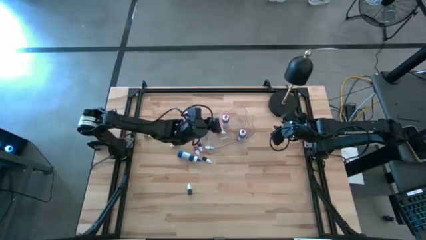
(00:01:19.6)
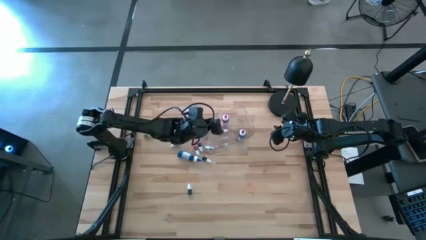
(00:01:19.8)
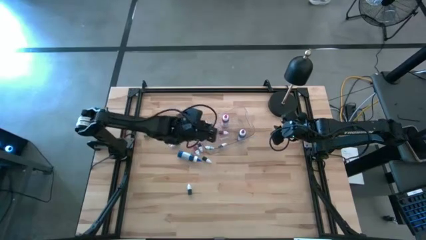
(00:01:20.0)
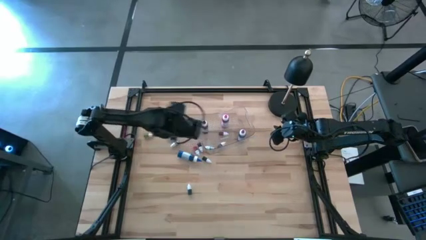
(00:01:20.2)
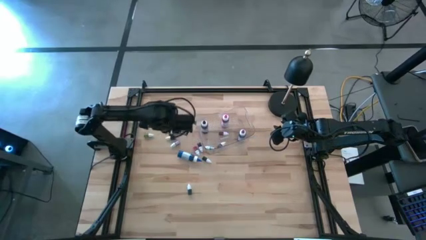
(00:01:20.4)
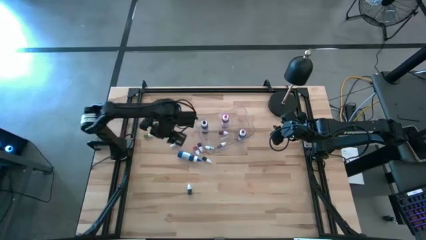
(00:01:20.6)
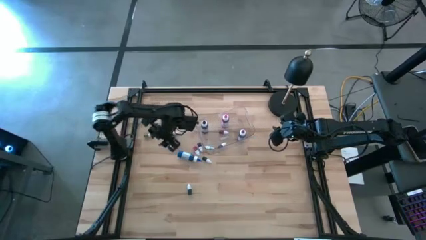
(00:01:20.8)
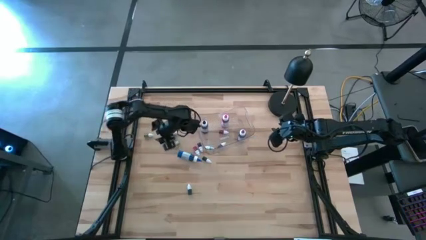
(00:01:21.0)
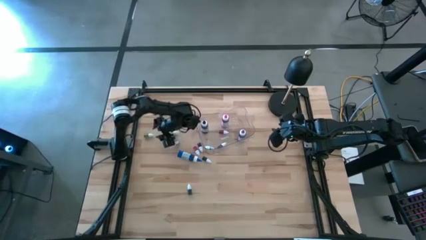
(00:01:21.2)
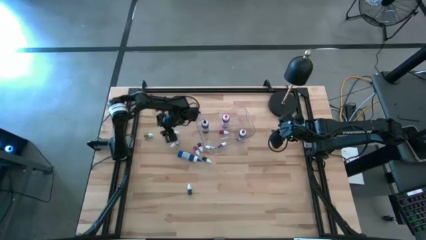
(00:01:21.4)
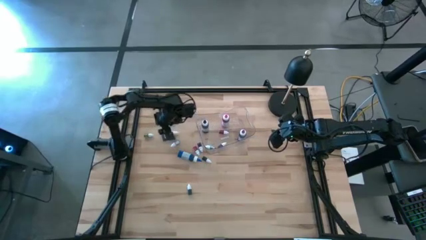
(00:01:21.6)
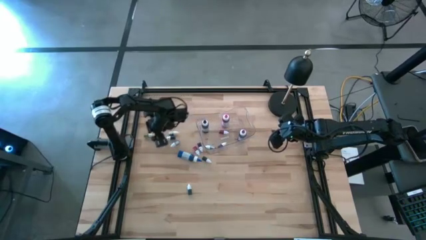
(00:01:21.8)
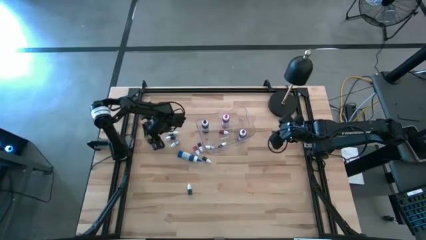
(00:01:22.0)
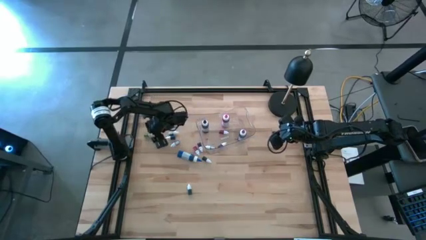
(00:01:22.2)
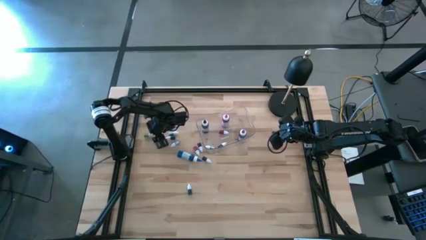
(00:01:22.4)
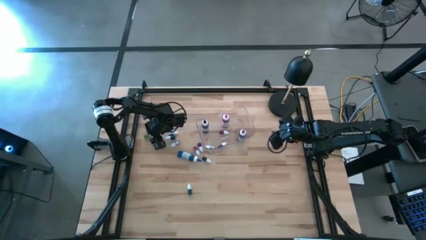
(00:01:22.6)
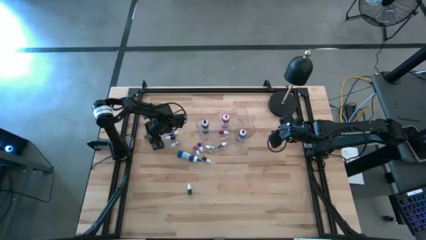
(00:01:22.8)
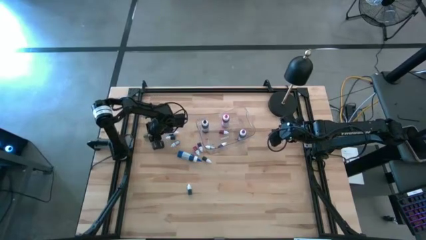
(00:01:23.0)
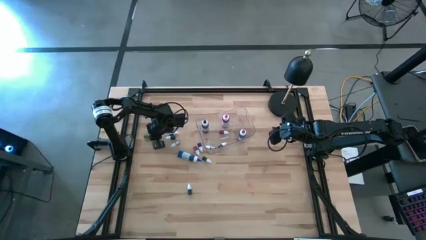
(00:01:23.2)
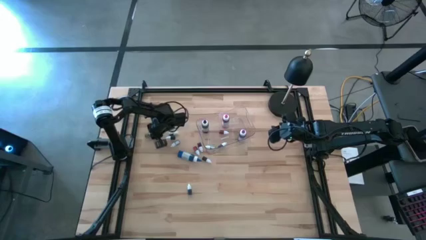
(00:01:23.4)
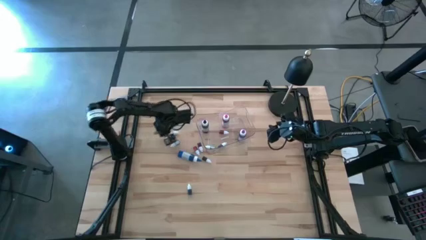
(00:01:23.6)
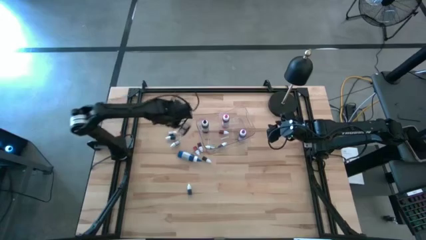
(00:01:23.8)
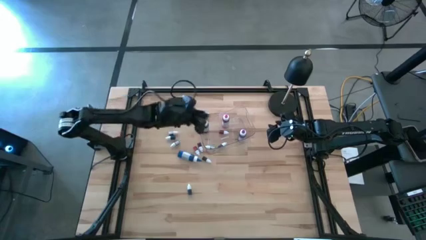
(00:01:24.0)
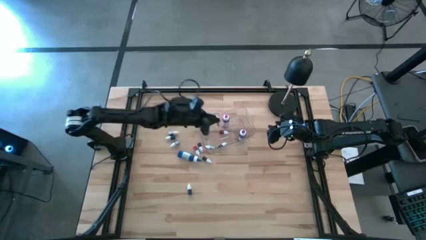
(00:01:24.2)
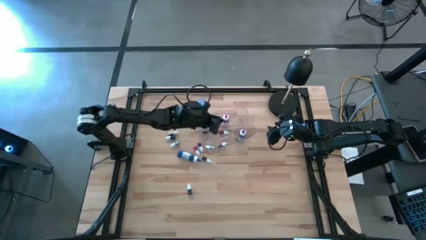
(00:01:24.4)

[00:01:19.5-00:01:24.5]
Task: Pick & Place food coloring
Put the top left small green food coloring bottle into the transparent container

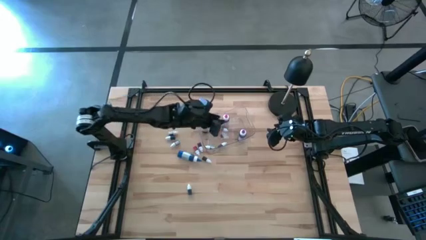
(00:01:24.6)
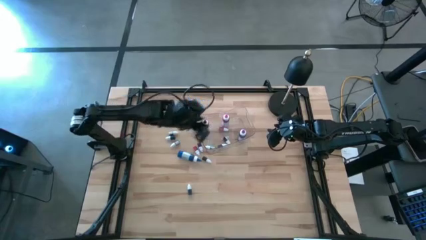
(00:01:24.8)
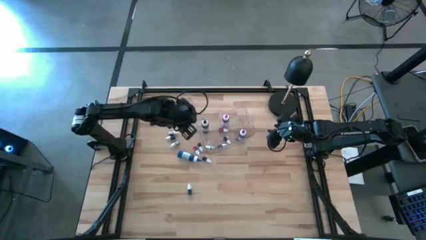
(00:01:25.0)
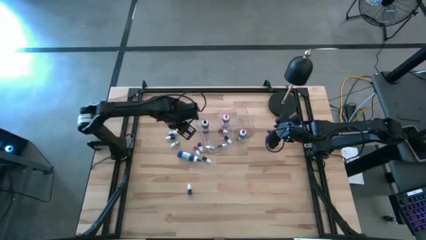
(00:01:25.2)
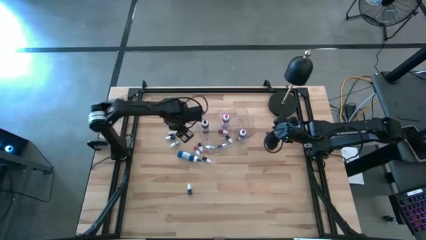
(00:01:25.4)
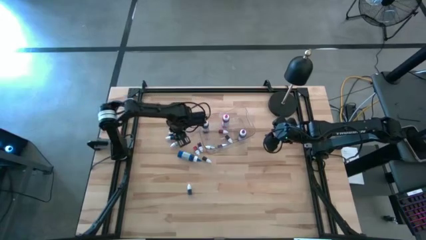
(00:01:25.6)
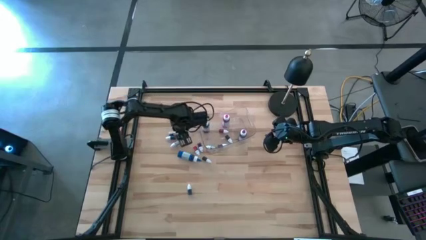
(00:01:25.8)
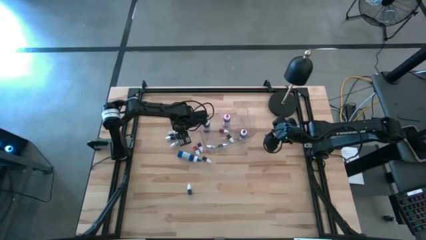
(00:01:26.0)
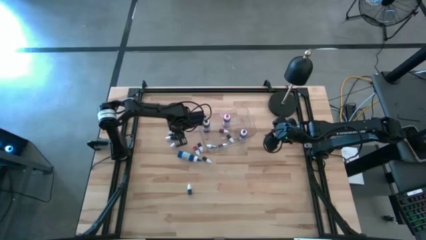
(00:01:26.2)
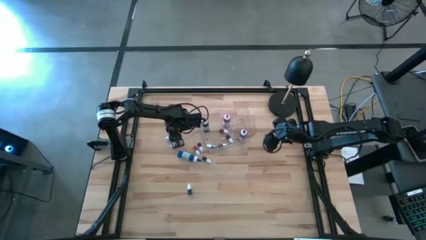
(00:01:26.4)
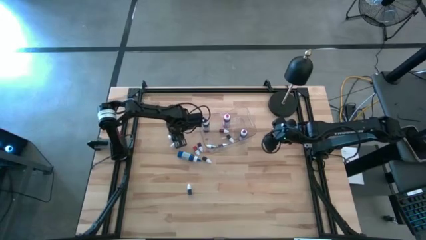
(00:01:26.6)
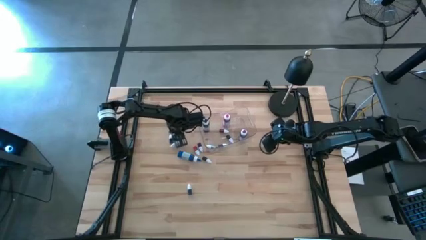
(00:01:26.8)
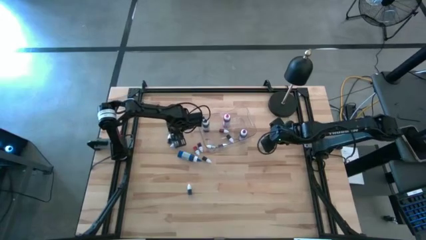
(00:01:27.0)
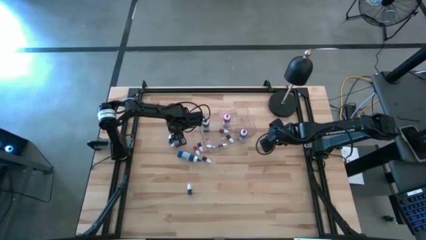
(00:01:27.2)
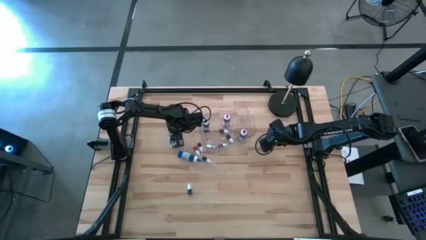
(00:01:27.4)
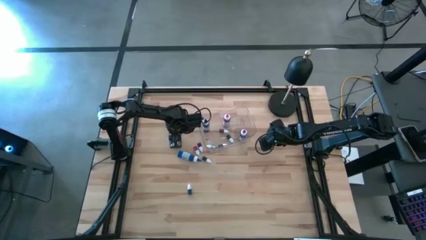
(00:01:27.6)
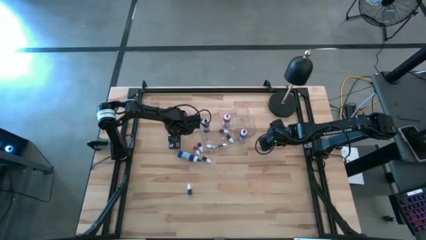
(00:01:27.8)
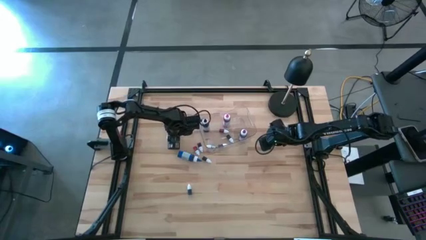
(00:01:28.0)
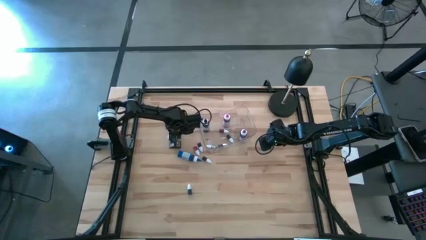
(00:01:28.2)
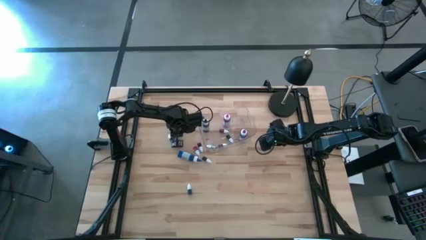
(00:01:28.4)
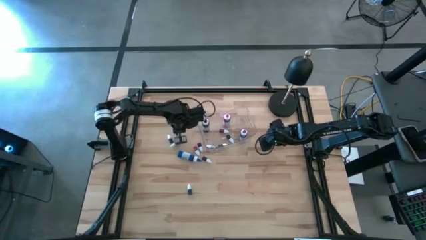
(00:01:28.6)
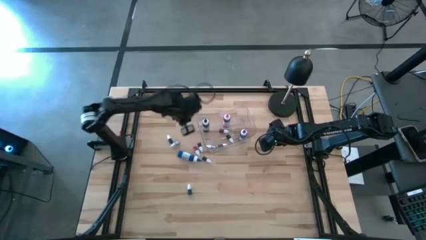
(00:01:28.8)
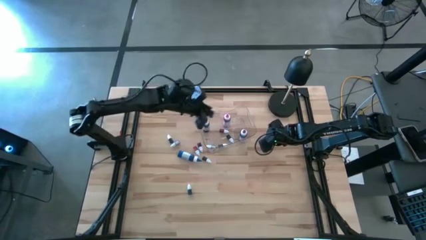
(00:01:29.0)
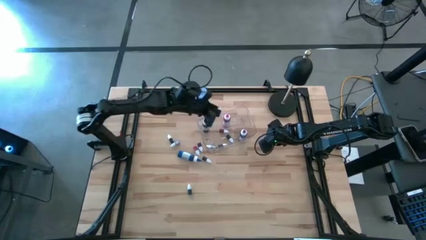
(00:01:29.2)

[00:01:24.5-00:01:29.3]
Put the top small green food coloring bottle into the transparent container

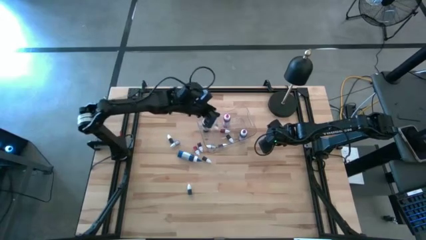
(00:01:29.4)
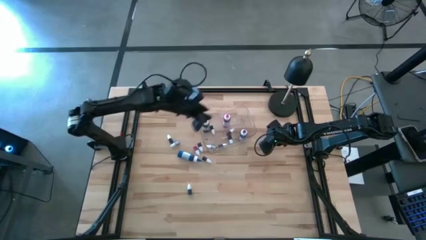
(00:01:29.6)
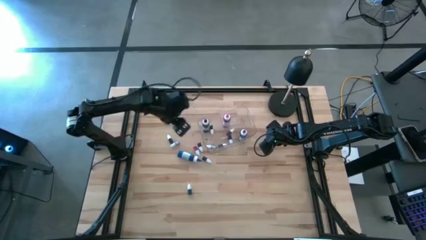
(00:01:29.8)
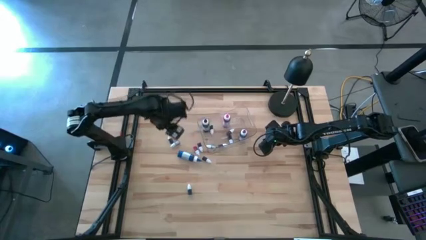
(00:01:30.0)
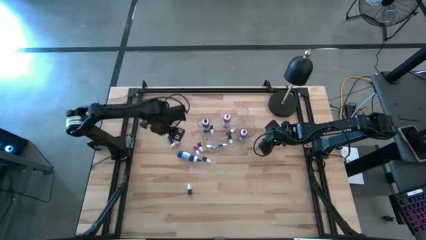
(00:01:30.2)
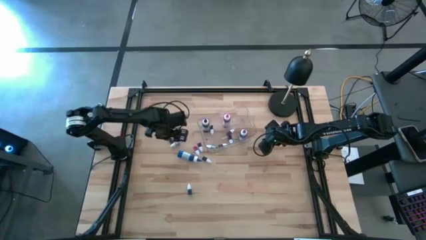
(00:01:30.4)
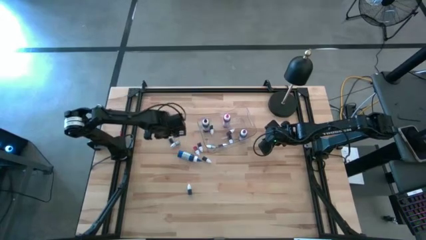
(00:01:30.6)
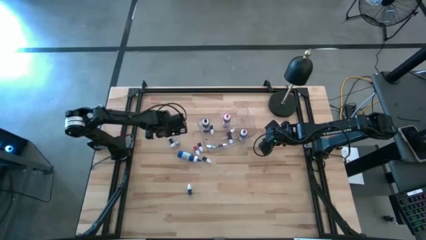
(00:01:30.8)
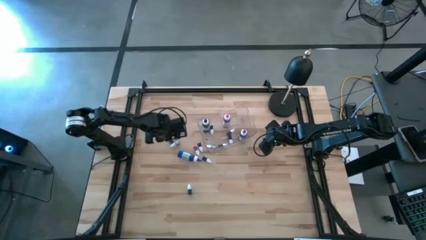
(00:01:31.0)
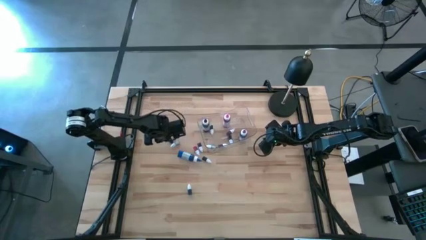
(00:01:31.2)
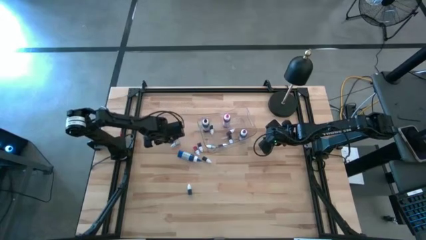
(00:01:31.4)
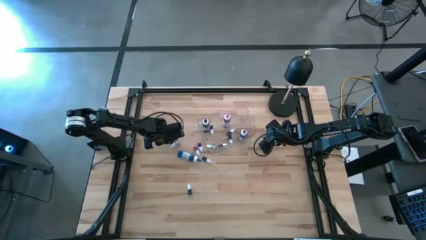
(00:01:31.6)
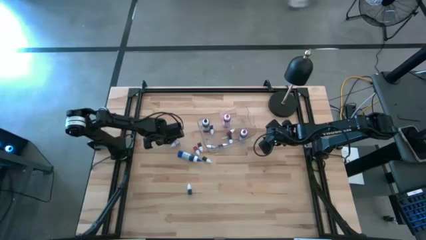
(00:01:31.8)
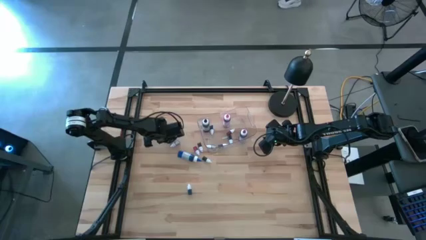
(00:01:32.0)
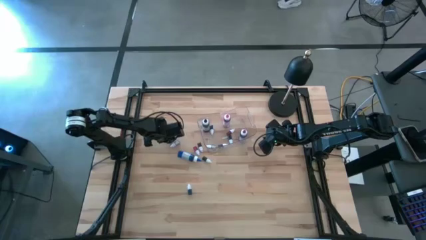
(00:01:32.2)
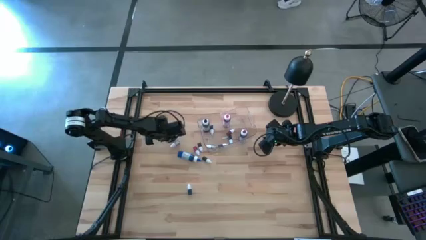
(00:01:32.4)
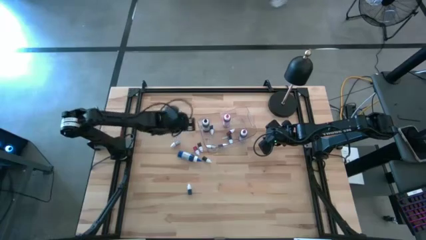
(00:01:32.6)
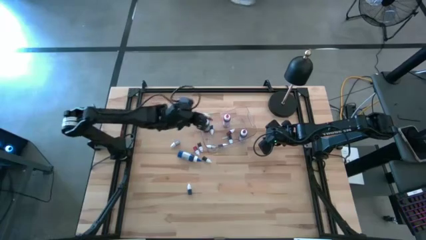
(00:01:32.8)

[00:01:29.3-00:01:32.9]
Put the small black food coloring bottle into the transparent container

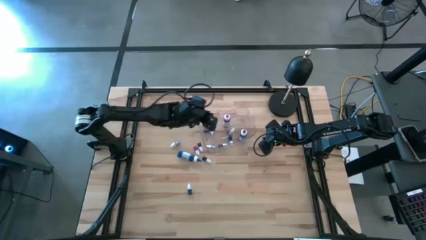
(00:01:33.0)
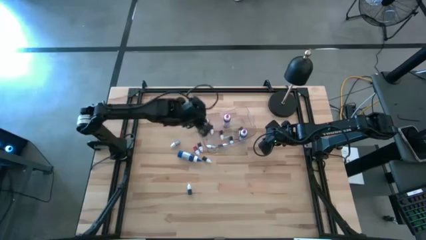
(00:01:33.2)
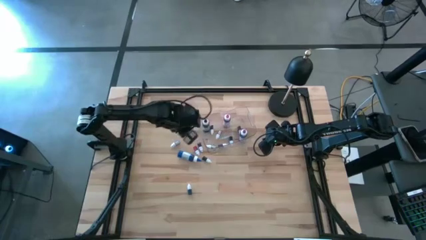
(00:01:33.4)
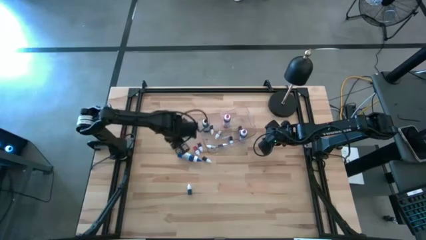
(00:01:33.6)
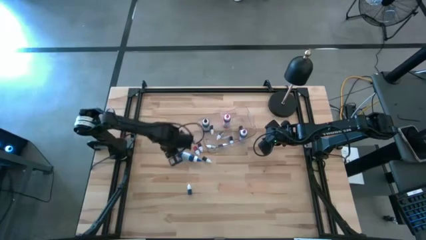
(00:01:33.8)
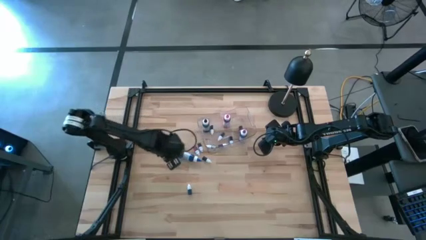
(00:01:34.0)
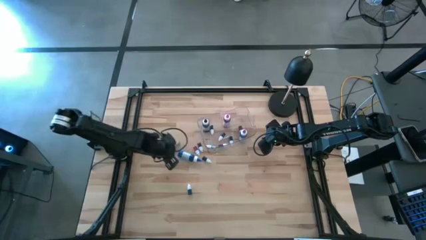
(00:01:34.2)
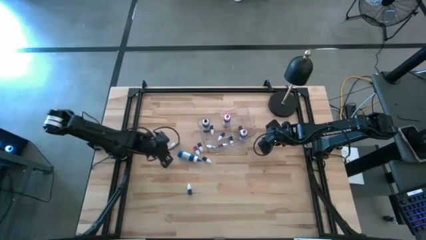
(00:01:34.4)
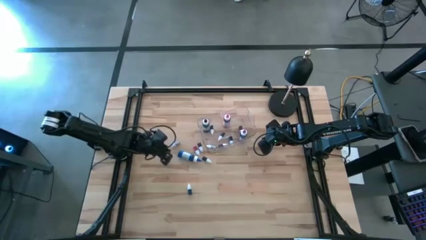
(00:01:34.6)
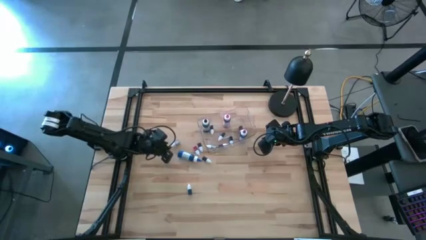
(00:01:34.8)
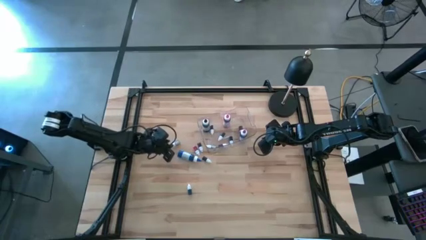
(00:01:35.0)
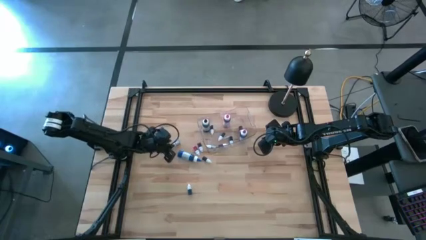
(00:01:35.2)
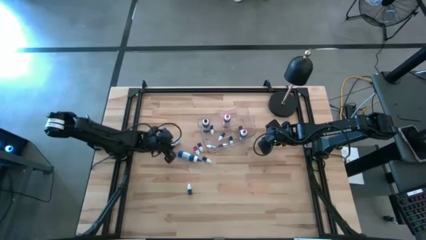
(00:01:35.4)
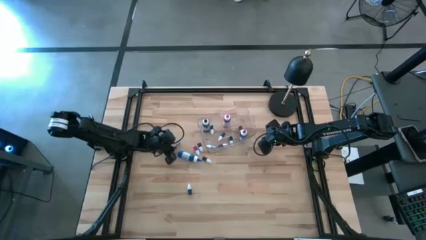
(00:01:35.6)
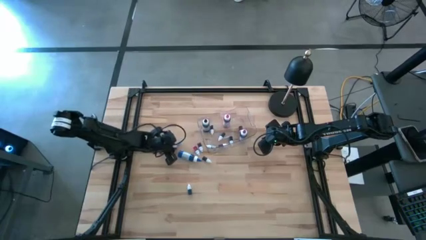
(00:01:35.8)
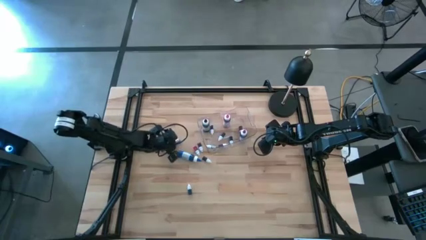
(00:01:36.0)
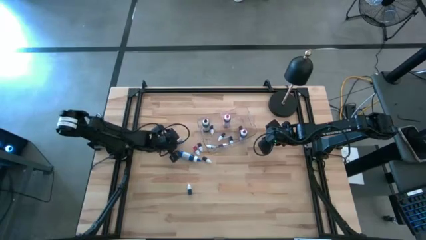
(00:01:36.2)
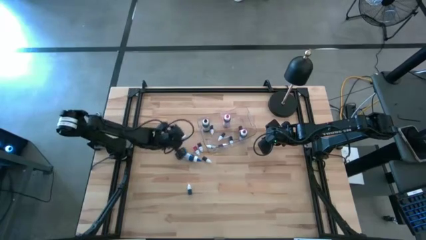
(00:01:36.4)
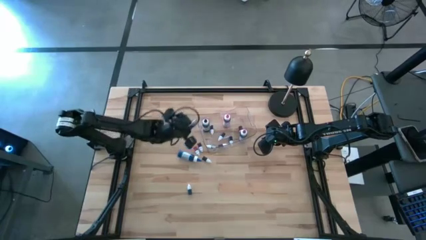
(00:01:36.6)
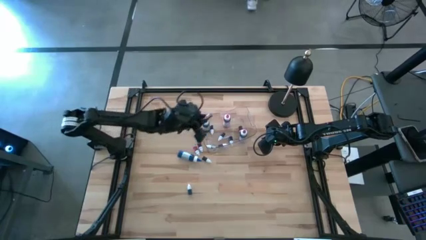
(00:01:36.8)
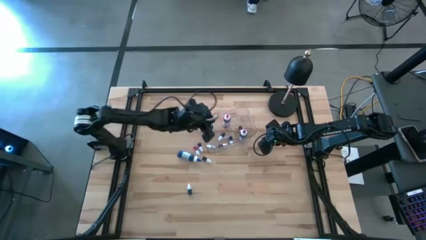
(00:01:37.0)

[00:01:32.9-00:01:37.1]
Put the small purple food coloring bottle into the transparent container
